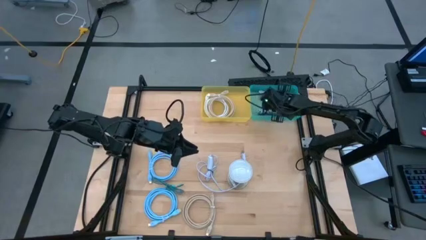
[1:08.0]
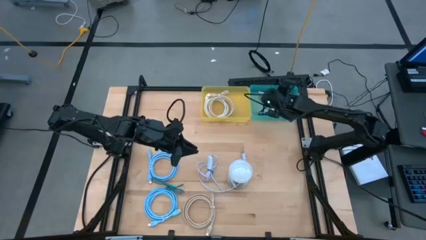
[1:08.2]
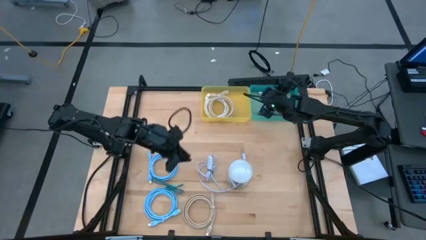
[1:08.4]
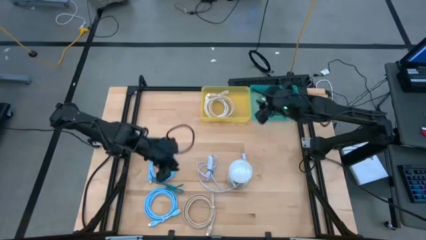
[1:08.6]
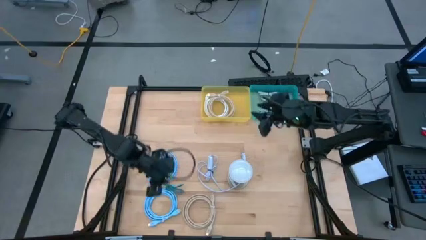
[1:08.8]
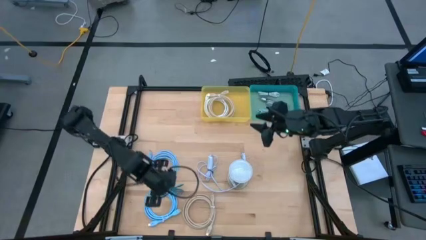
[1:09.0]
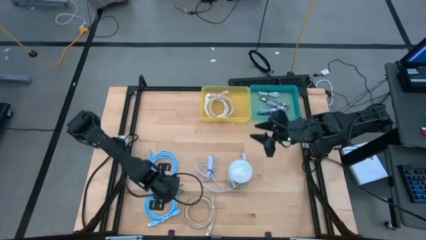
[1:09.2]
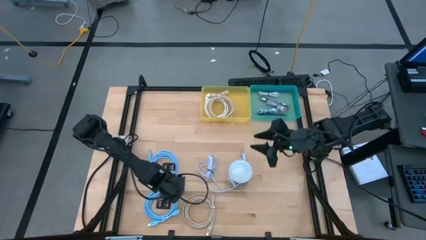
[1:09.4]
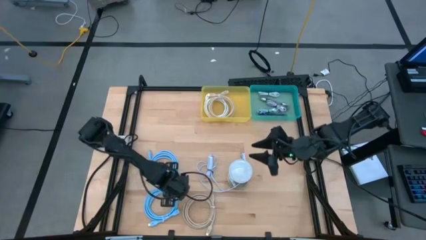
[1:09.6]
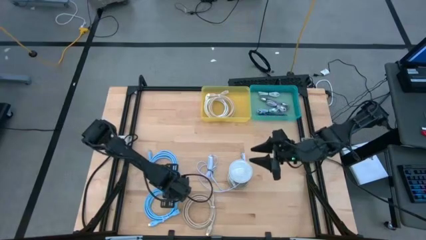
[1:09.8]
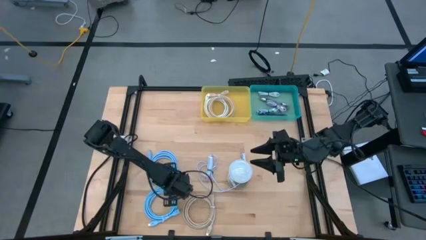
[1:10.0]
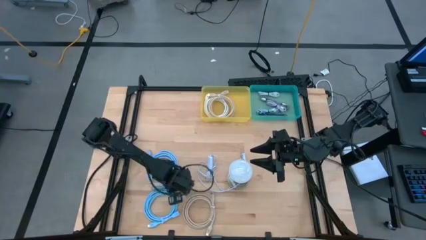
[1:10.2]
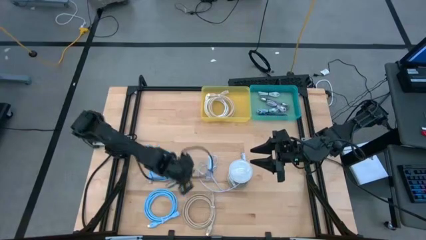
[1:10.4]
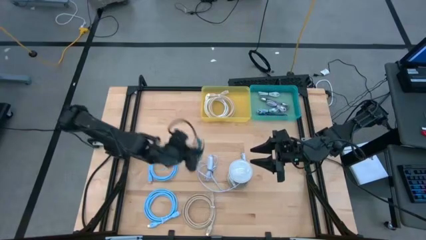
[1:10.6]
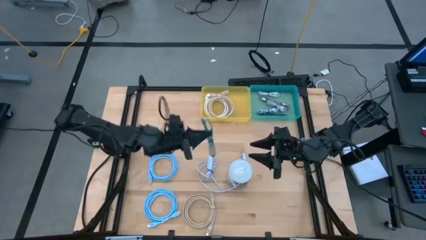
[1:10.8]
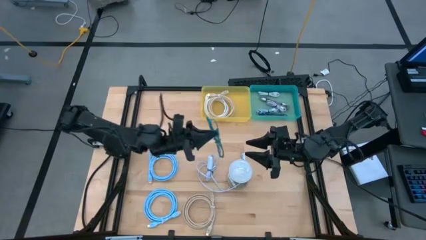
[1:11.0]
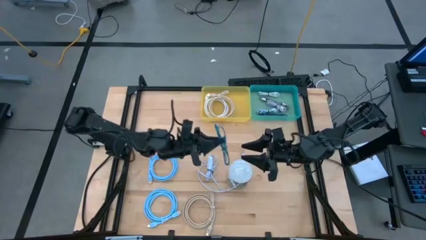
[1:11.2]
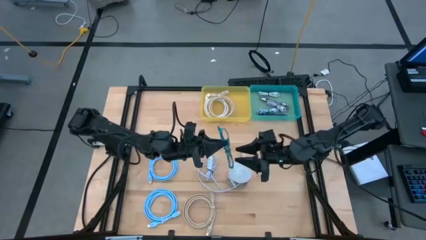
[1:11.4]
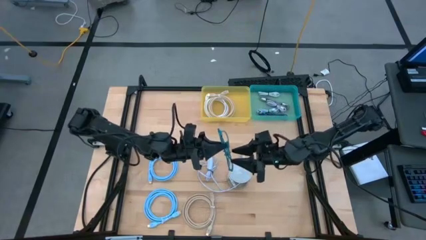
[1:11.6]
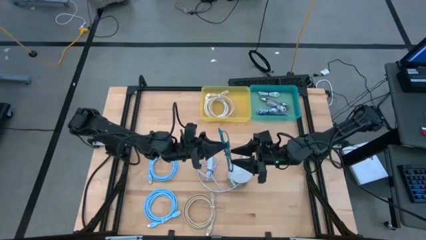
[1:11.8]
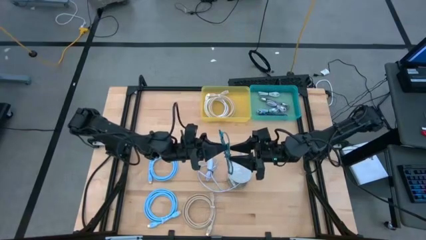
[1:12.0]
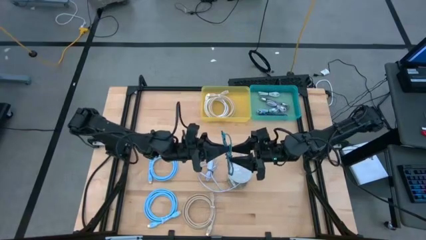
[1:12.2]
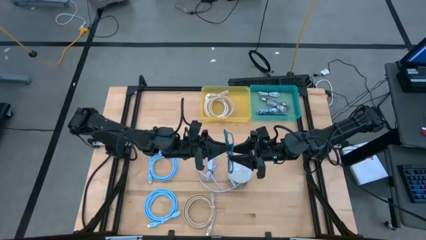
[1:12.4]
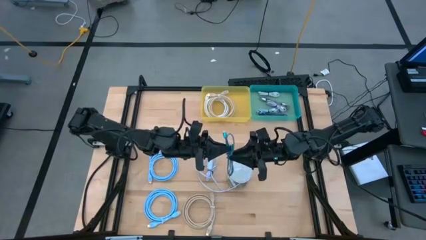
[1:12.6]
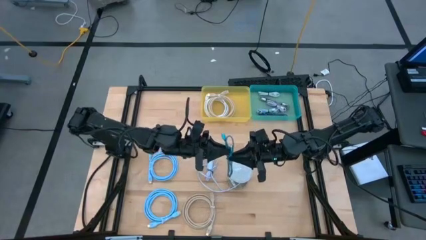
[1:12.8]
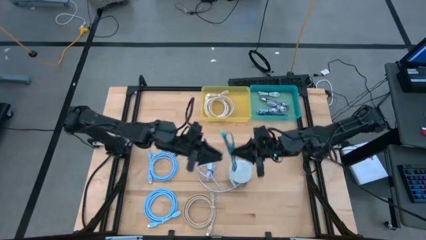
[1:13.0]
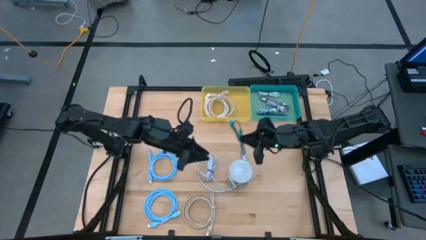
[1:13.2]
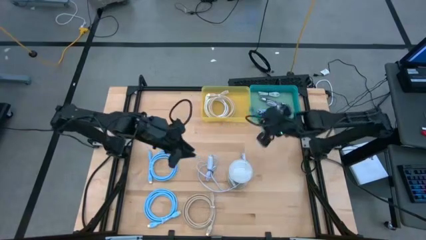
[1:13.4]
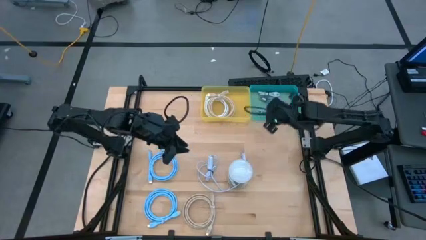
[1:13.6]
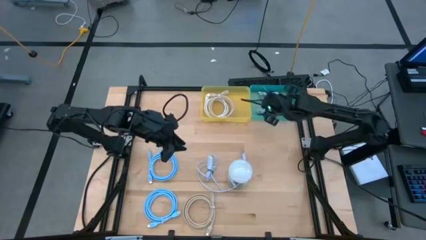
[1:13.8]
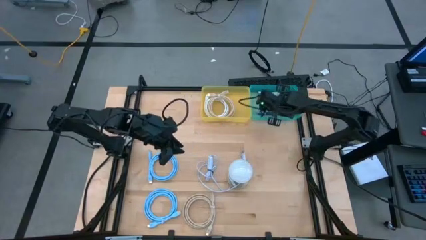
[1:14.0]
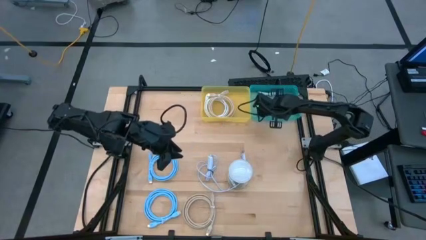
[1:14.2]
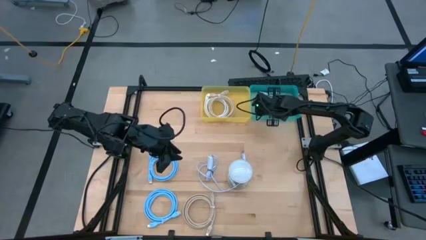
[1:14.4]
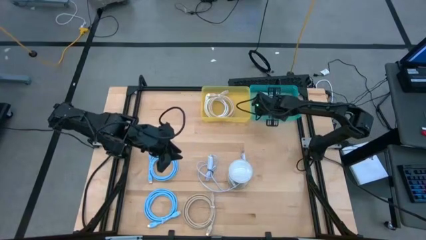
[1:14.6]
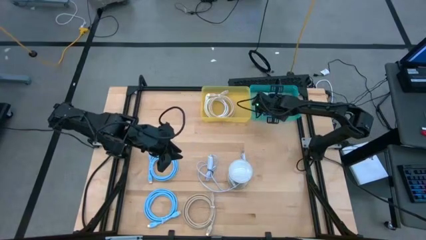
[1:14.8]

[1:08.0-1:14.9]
Task: Pick & Place USB Port
Put the green and black charger cable into the green bin

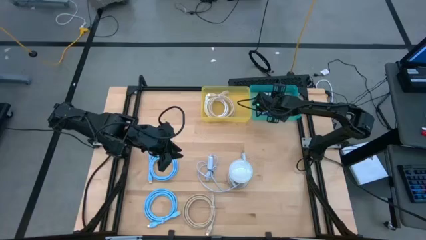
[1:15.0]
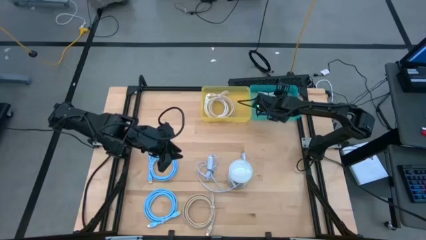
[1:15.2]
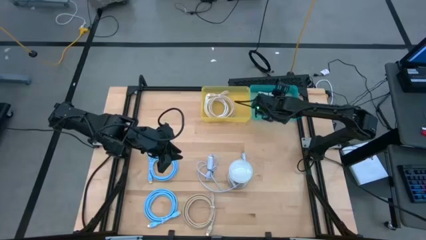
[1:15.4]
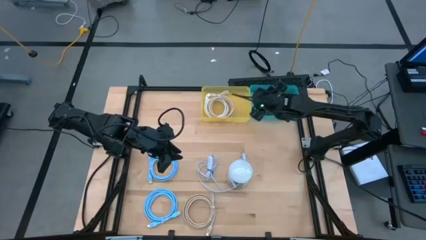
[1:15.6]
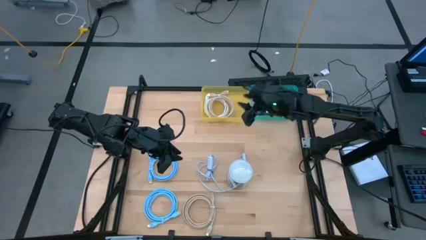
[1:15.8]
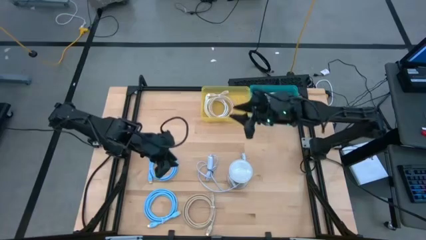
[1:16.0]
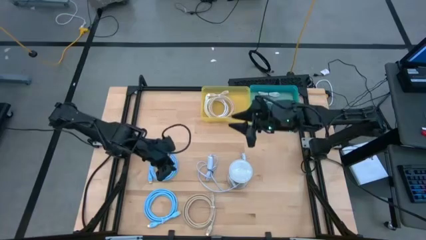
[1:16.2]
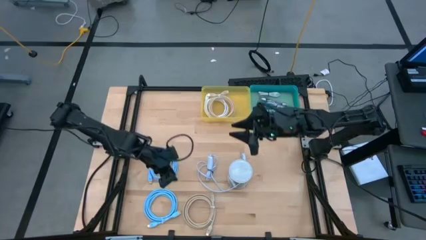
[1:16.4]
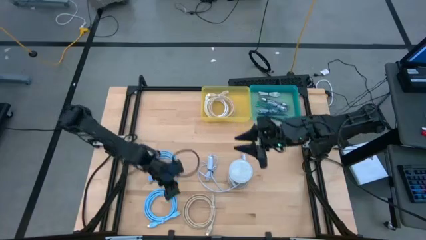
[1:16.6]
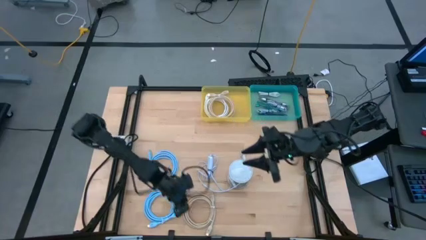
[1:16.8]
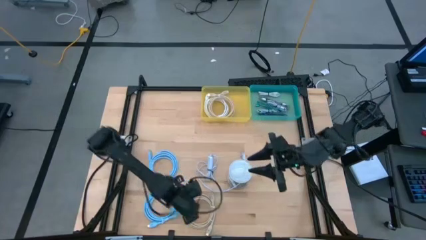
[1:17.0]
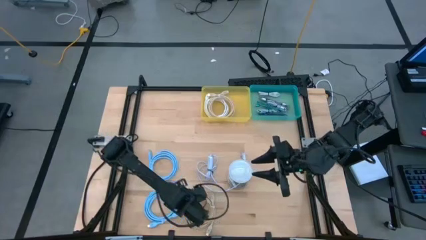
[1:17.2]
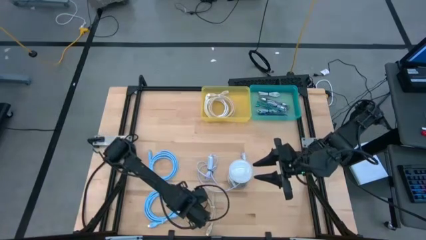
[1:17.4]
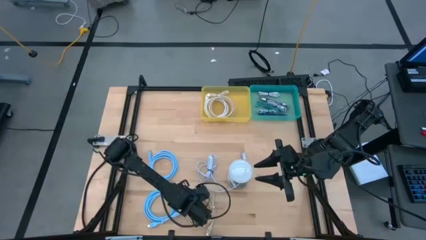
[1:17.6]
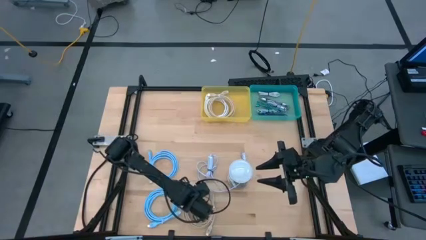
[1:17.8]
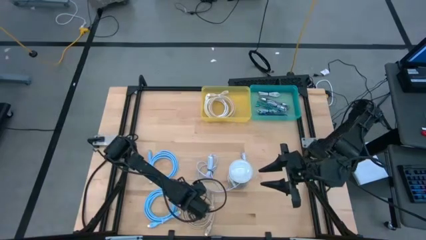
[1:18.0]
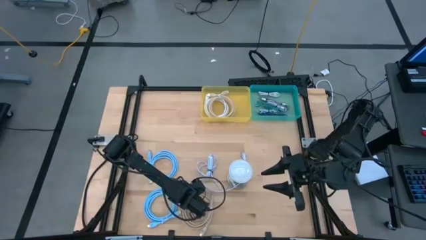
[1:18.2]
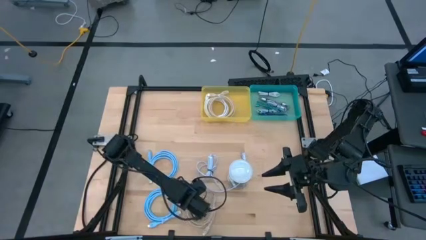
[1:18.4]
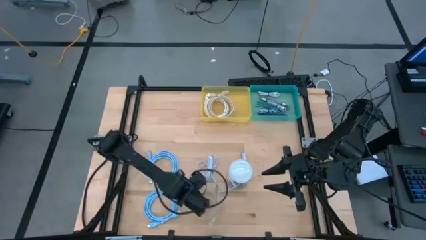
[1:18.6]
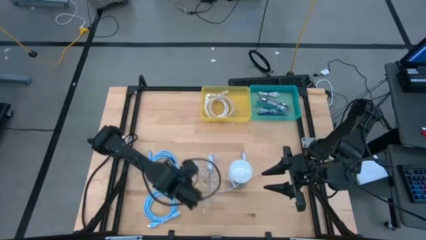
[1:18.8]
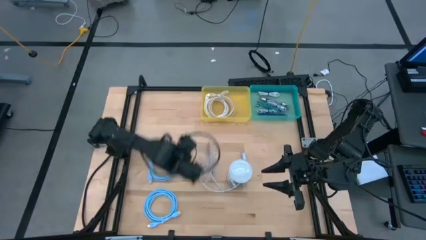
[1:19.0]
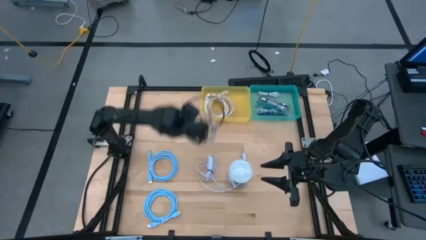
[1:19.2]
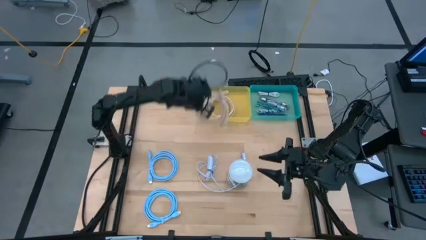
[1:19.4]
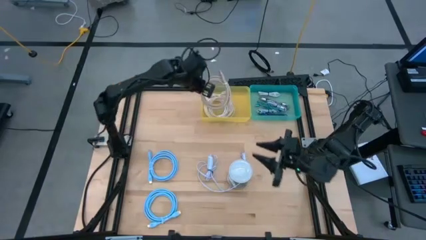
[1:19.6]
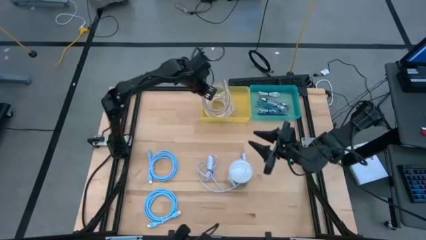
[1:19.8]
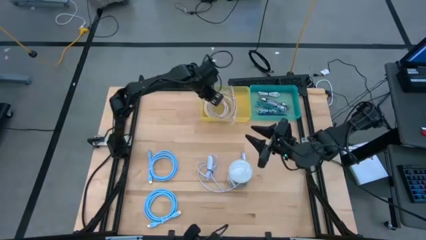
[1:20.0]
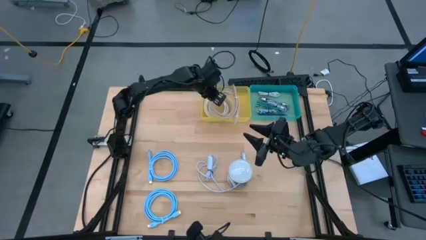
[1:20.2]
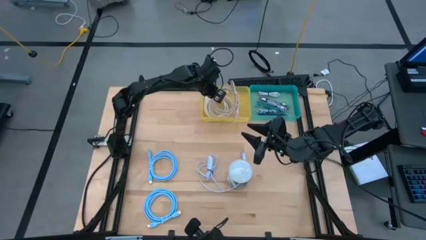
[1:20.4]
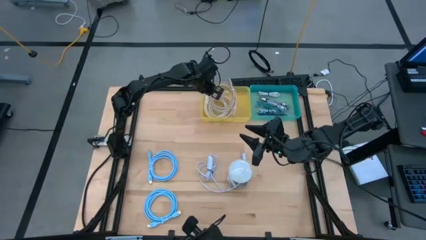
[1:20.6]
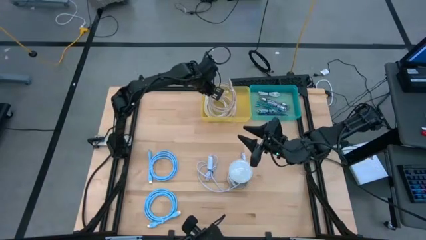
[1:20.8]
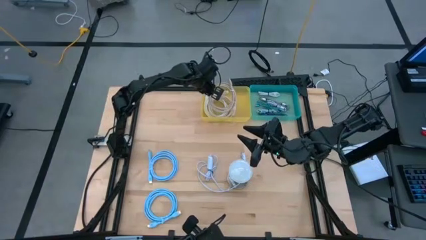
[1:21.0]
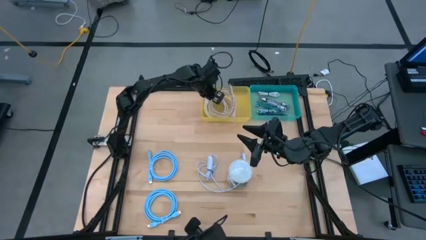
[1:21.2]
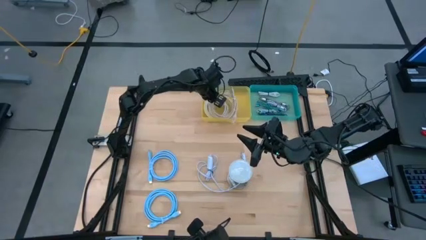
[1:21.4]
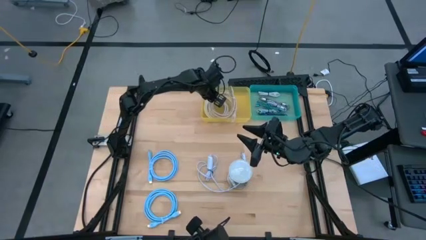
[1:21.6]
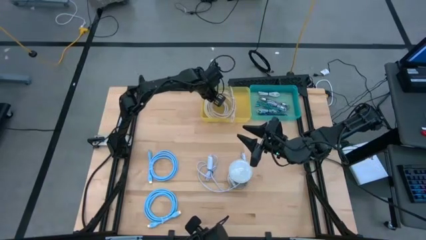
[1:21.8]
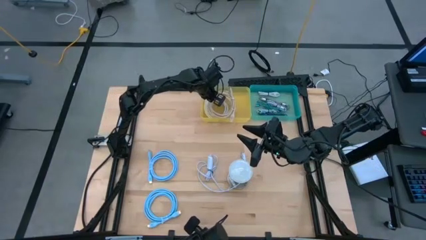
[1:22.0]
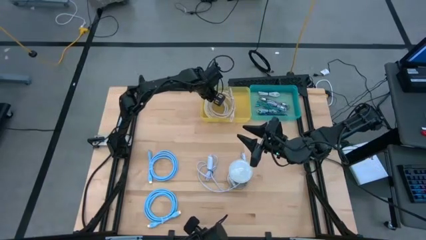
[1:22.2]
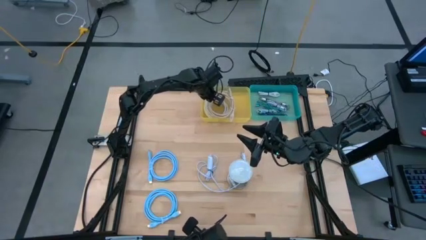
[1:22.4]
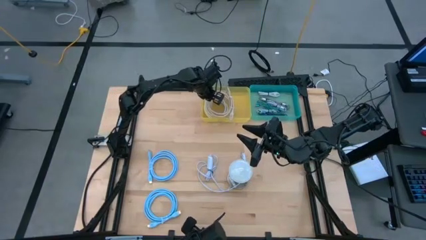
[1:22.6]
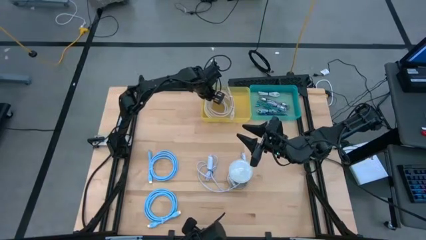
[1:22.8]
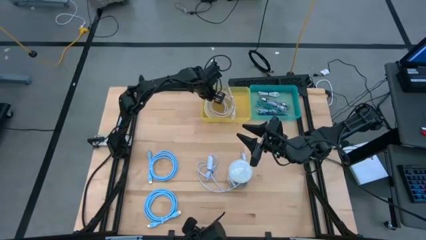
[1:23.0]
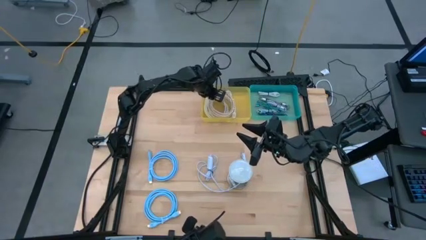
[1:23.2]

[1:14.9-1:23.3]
Put the brown HDMI cable into the yellow bin
